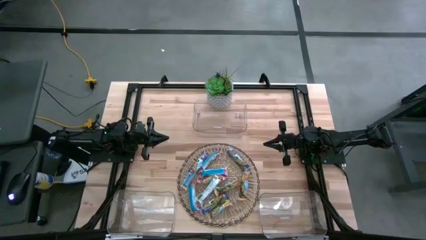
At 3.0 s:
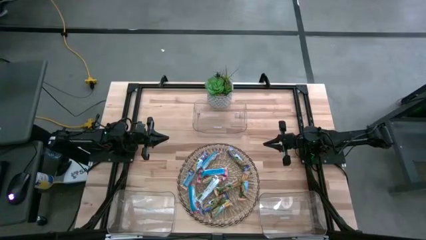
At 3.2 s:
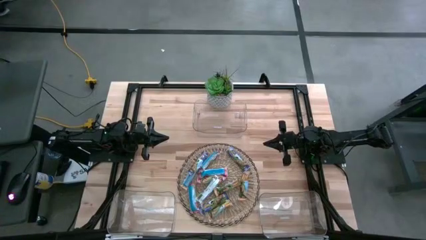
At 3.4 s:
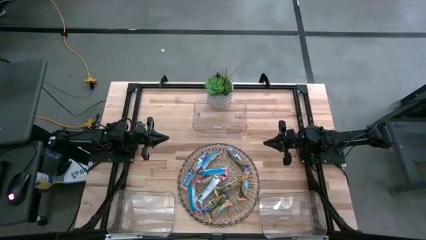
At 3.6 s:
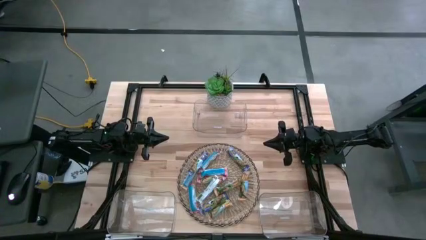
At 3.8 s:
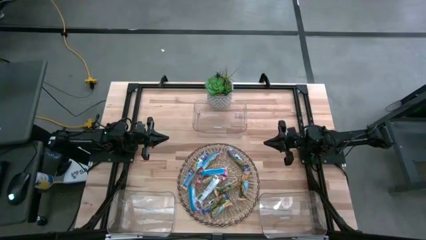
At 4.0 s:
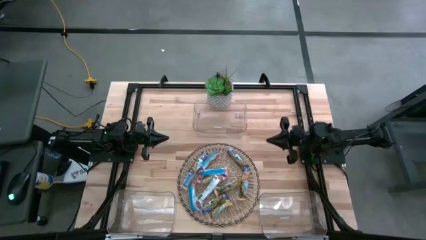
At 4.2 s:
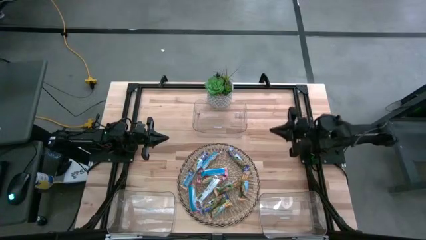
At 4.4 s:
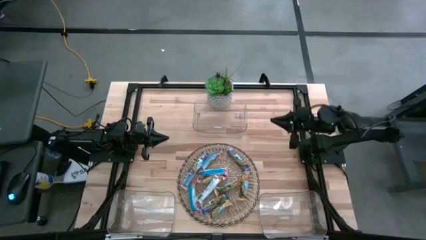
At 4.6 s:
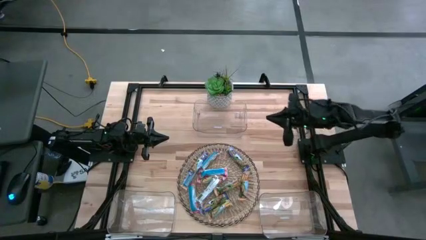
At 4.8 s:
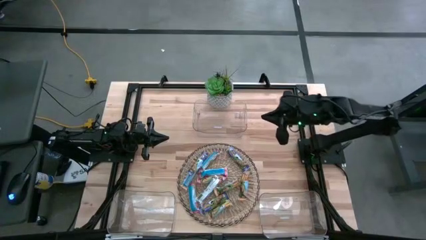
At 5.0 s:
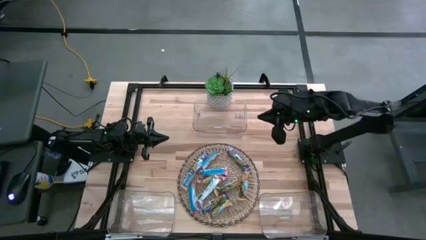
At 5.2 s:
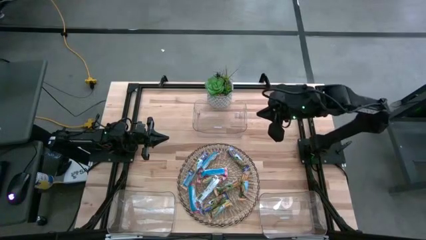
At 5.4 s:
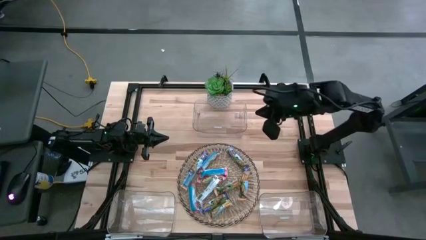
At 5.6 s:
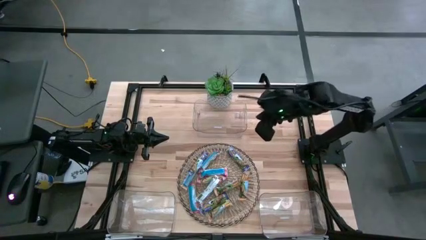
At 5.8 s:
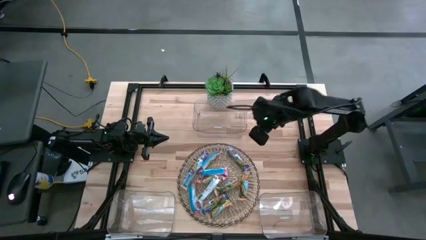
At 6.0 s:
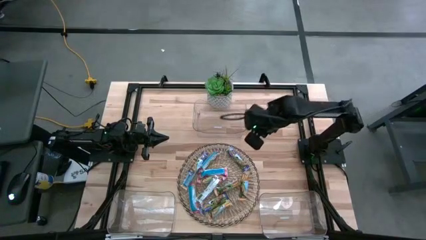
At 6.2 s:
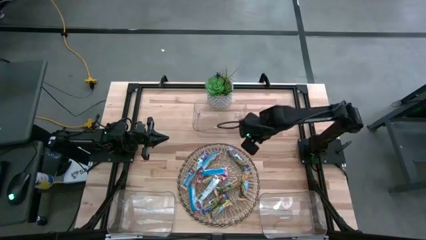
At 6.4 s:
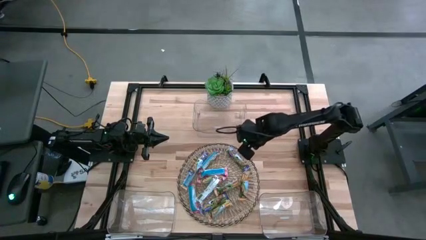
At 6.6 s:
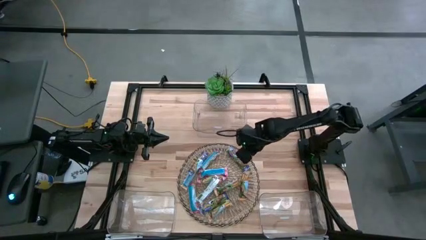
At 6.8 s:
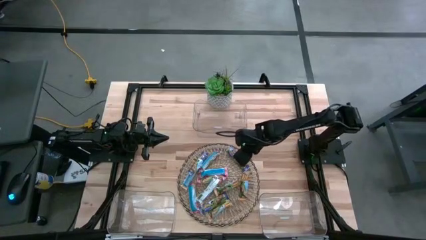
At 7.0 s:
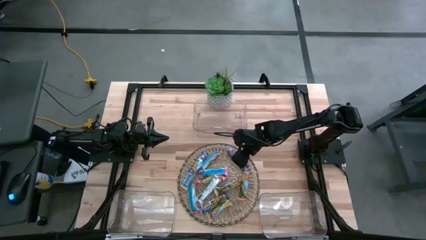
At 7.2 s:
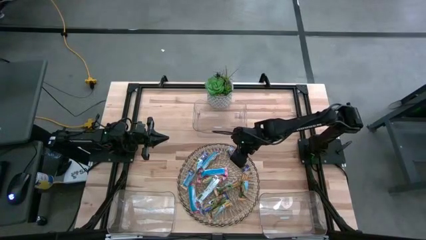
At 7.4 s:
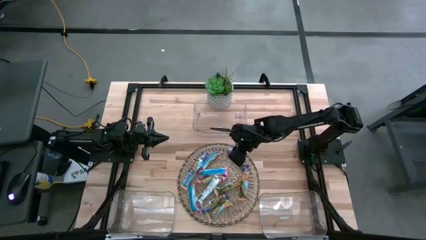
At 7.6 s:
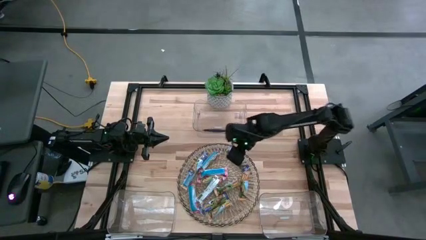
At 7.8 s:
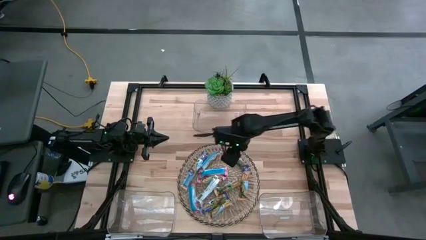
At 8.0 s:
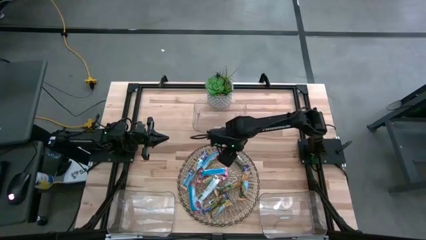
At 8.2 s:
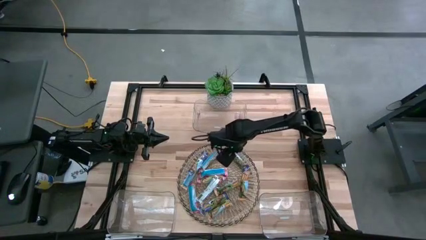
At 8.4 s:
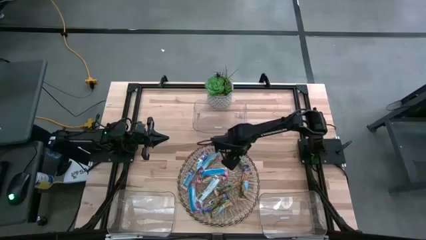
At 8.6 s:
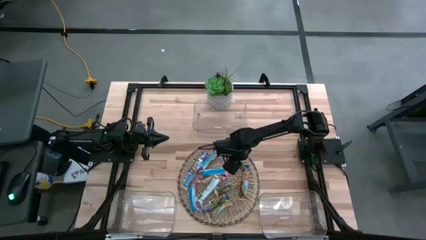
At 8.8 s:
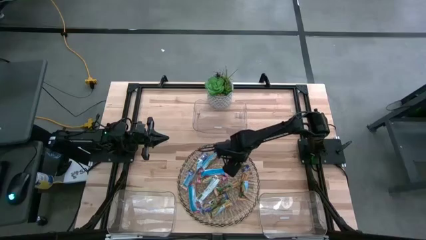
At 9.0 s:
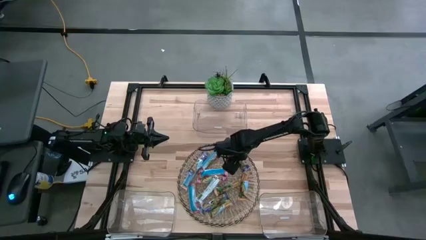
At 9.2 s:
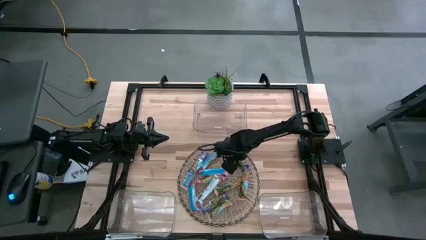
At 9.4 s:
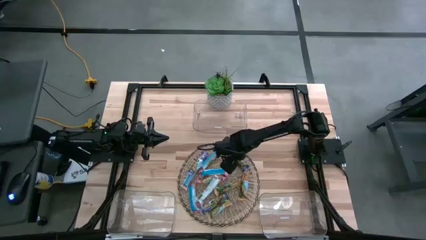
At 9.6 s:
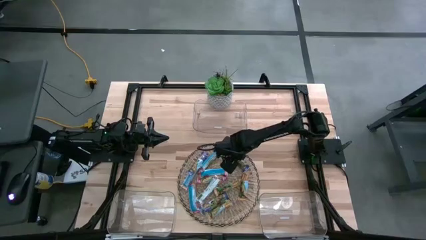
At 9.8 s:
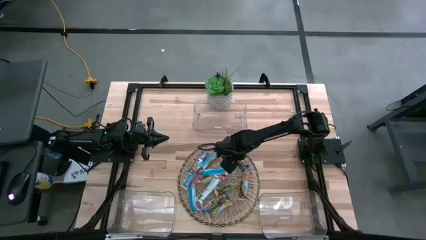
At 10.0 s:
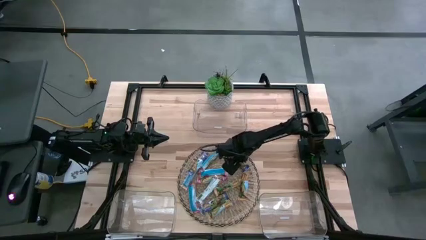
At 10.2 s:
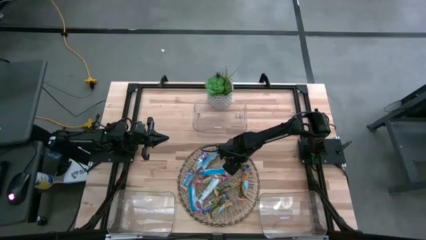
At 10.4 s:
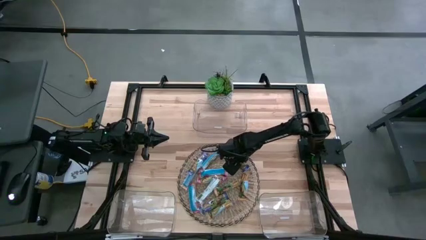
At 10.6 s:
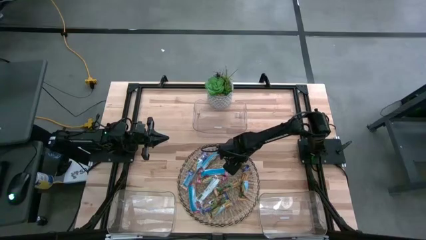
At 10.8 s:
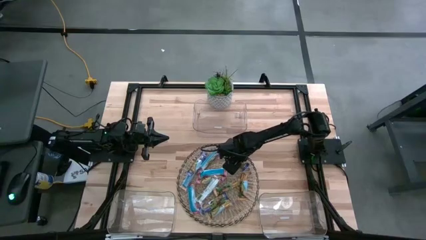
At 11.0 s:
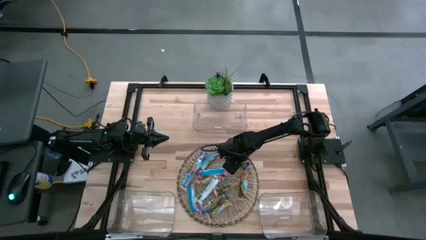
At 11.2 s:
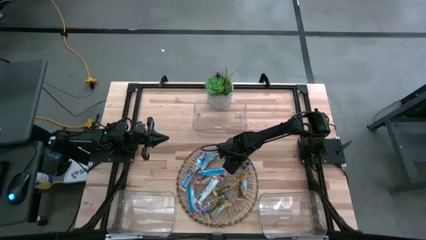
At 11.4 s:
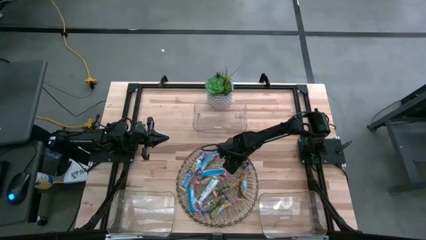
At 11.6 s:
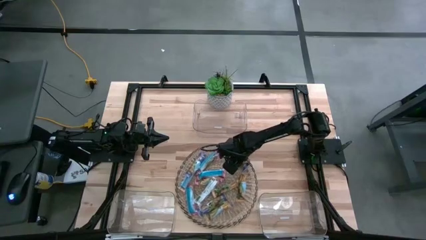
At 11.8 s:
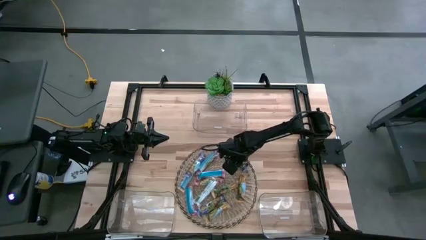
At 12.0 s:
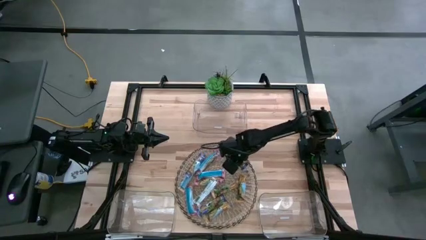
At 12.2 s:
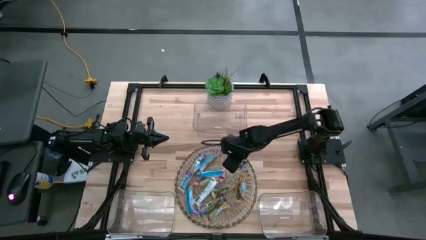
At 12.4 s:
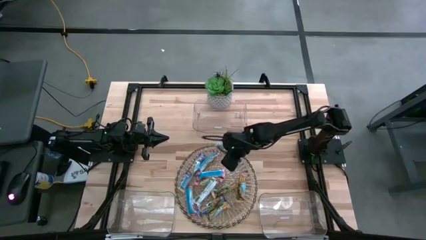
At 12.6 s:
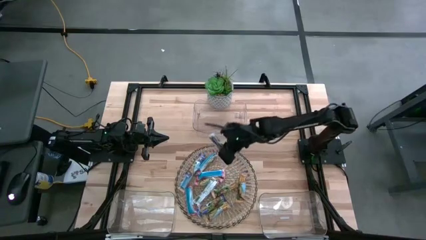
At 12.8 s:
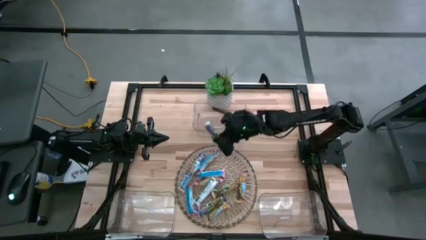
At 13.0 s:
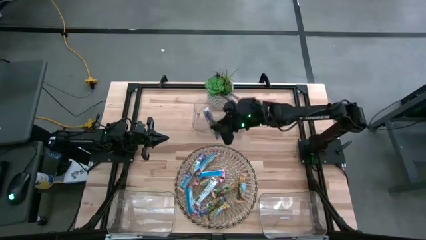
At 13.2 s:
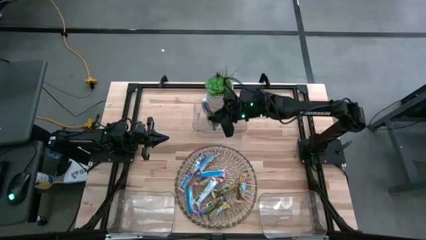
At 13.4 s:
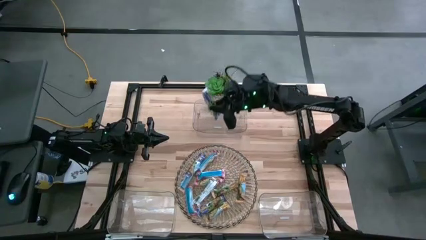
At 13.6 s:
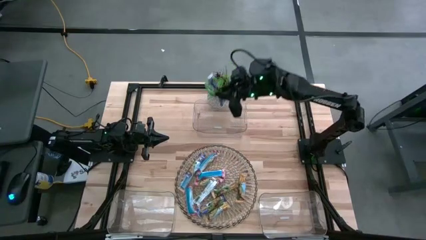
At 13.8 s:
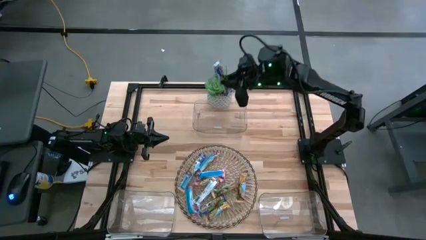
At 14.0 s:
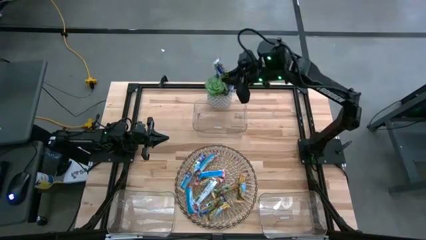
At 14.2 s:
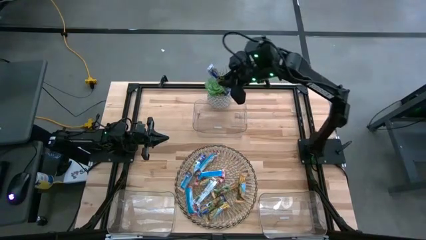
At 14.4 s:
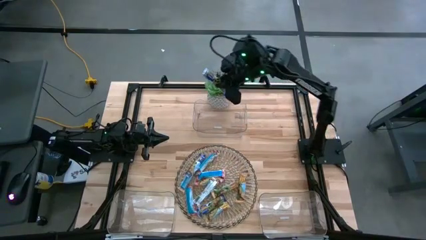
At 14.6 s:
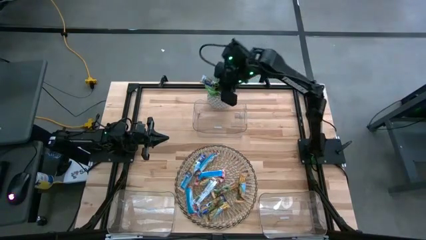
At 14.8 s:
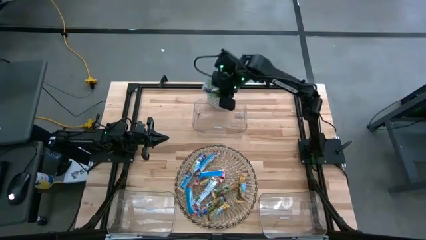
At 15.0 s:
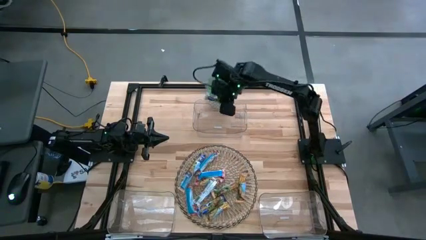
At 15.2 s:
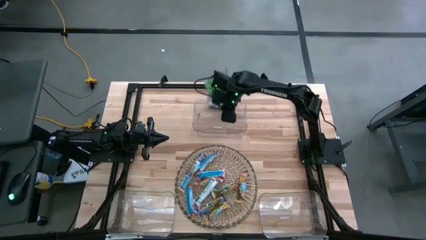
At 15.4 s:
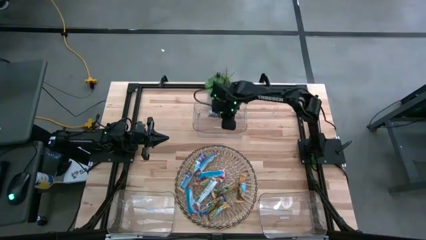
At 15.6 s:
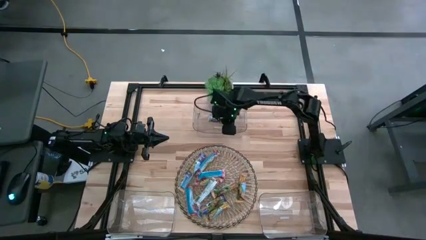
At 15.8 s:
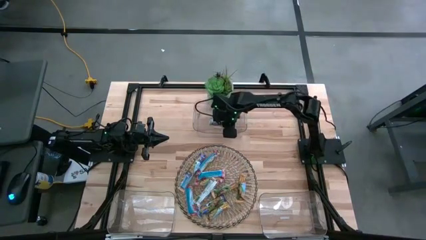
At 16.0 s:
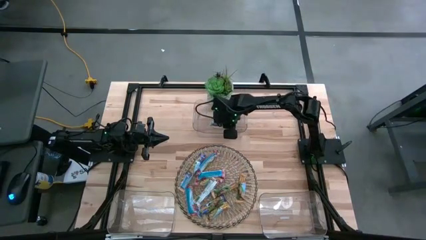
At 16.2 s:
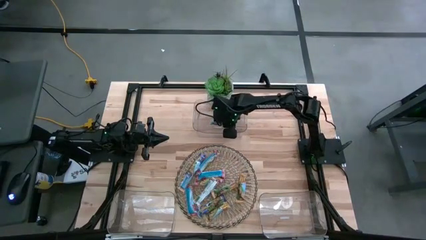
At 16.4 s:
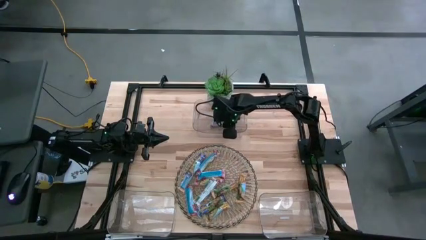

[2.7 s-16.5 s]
Task: Pick and place Granola Bars by type
Put the blue granola bar into the top transparent bin
